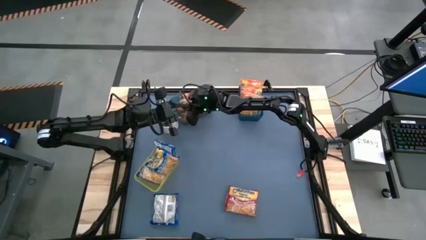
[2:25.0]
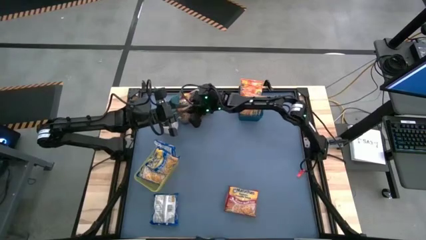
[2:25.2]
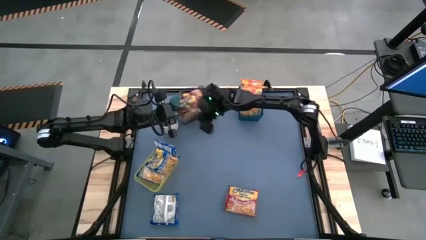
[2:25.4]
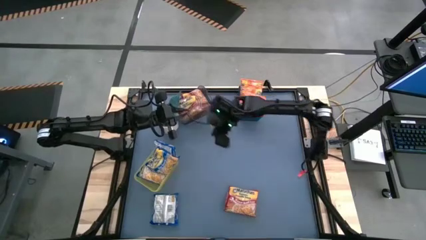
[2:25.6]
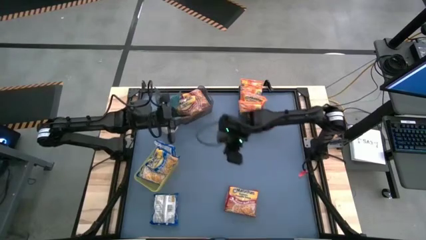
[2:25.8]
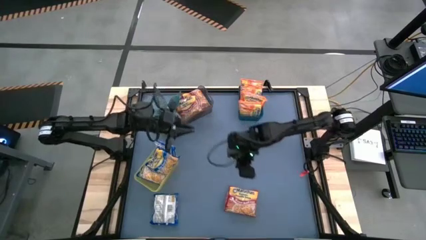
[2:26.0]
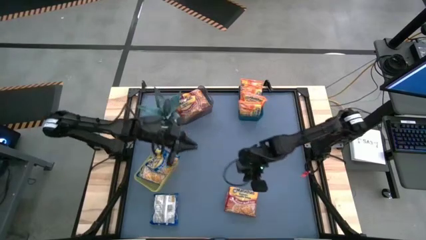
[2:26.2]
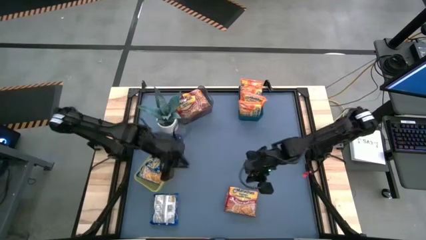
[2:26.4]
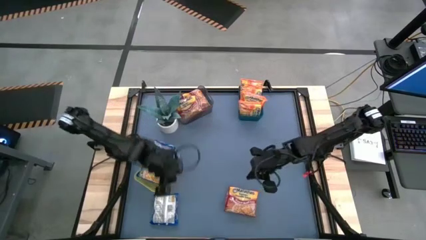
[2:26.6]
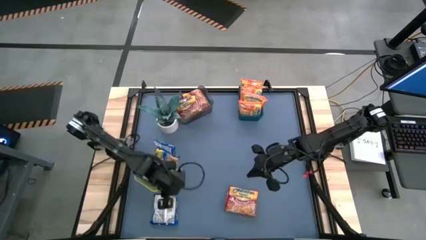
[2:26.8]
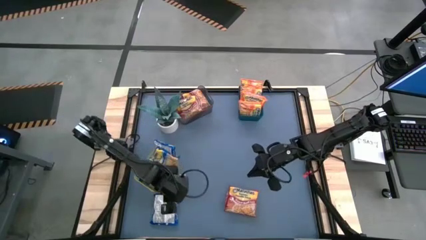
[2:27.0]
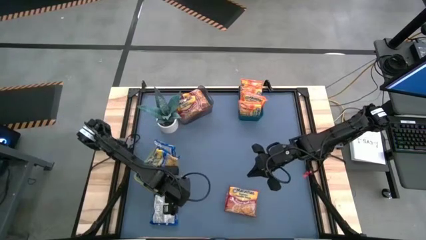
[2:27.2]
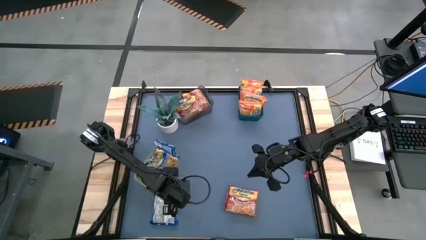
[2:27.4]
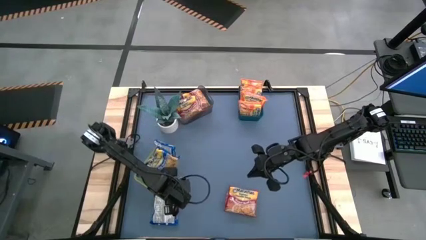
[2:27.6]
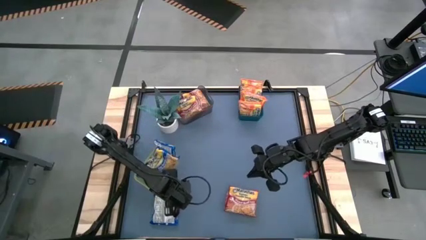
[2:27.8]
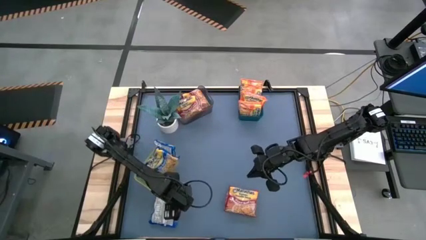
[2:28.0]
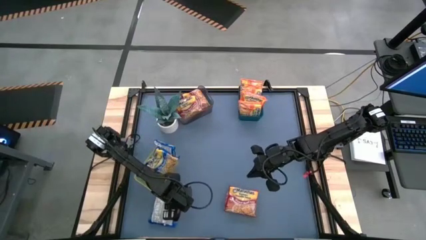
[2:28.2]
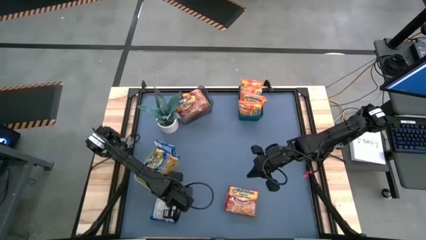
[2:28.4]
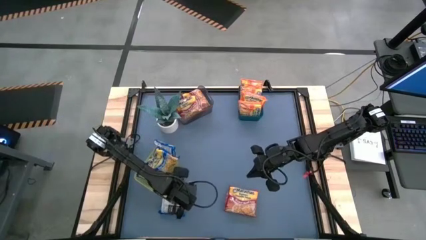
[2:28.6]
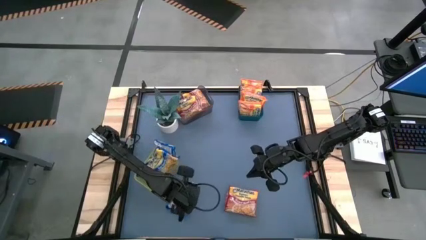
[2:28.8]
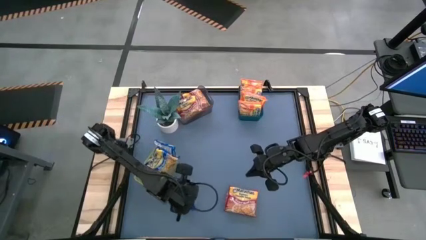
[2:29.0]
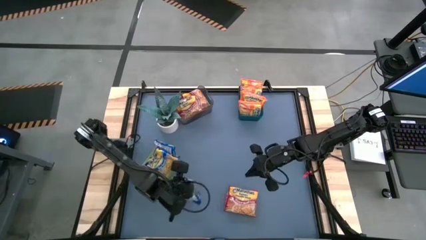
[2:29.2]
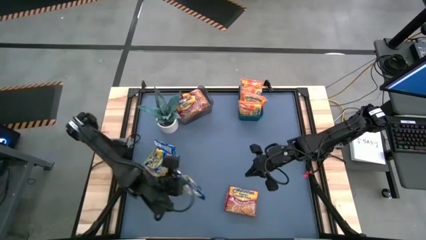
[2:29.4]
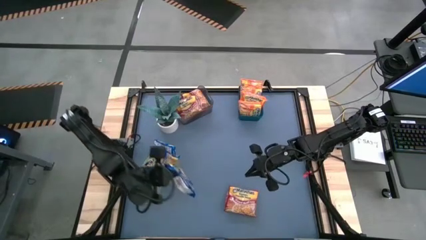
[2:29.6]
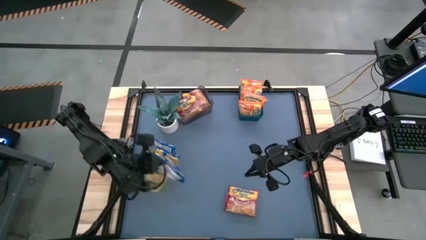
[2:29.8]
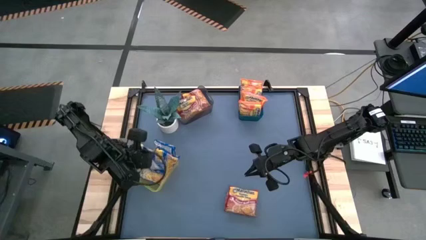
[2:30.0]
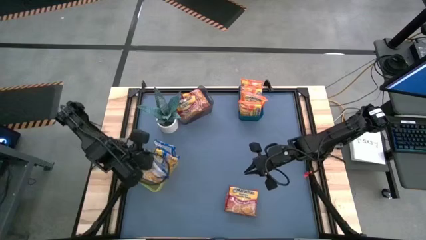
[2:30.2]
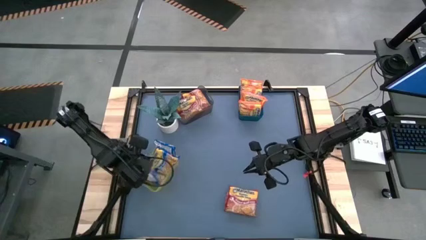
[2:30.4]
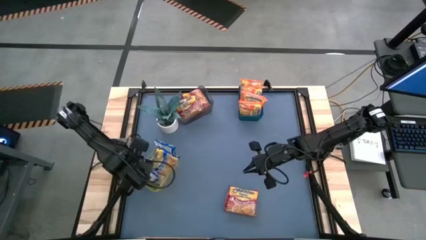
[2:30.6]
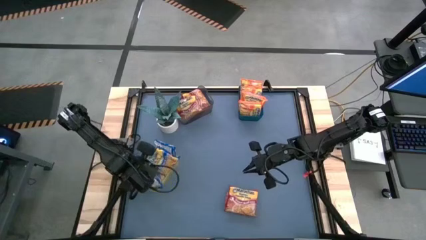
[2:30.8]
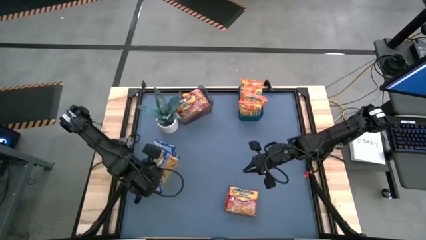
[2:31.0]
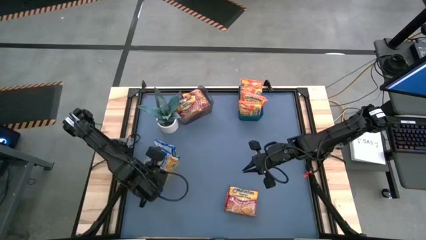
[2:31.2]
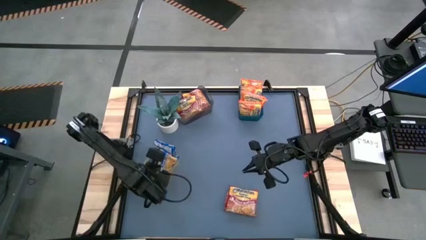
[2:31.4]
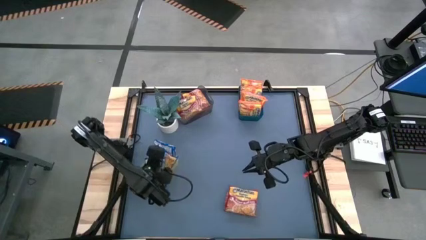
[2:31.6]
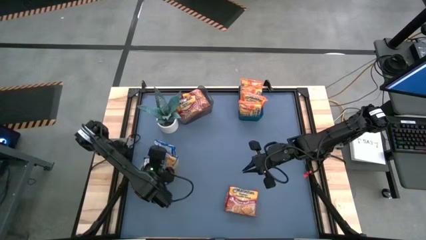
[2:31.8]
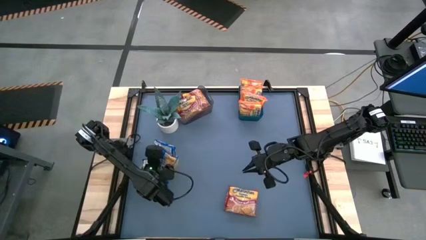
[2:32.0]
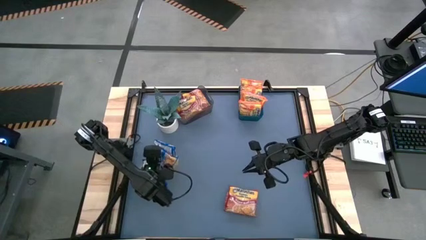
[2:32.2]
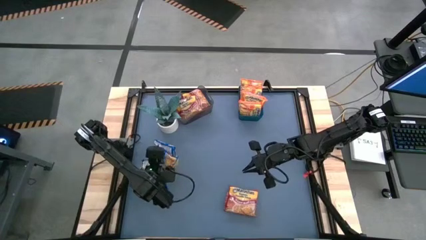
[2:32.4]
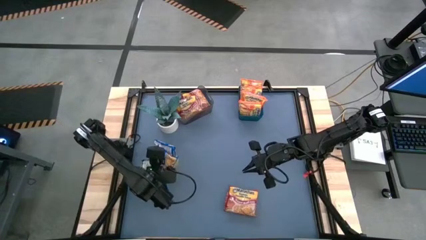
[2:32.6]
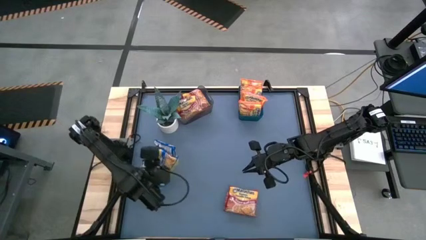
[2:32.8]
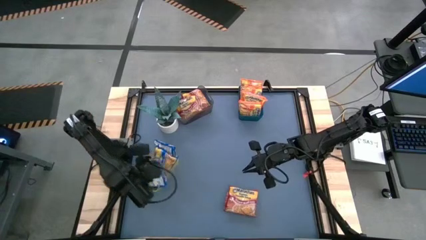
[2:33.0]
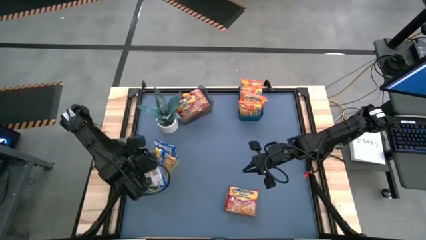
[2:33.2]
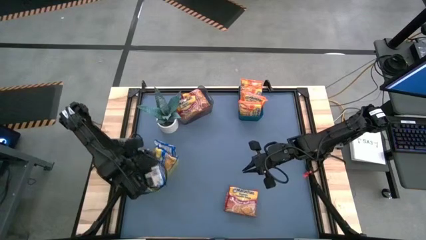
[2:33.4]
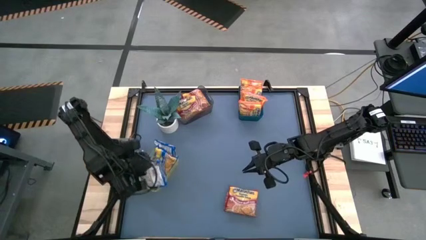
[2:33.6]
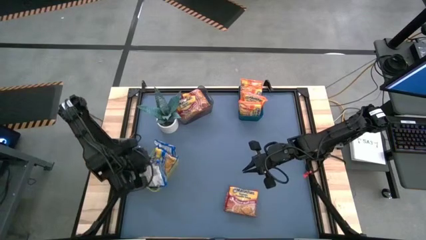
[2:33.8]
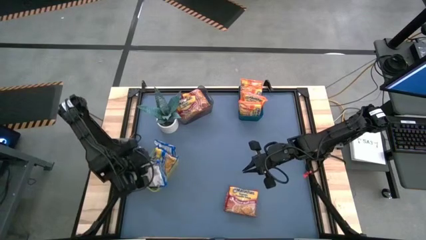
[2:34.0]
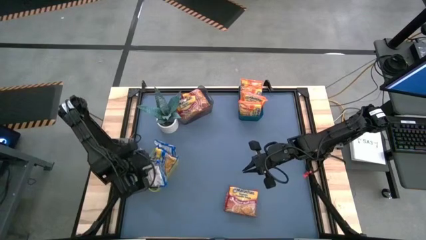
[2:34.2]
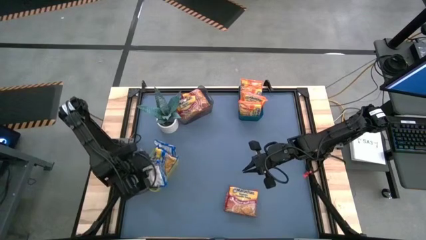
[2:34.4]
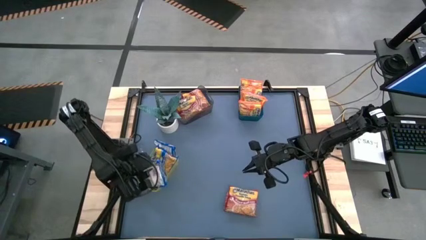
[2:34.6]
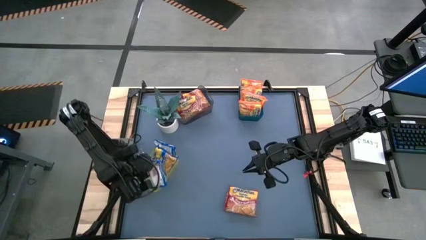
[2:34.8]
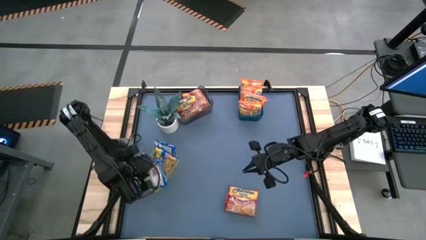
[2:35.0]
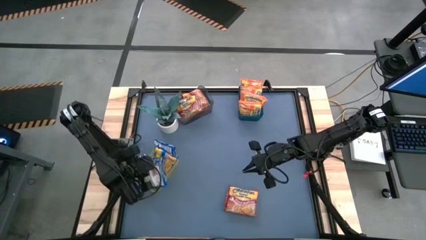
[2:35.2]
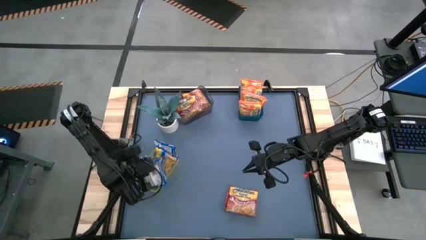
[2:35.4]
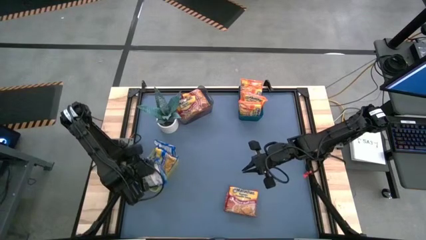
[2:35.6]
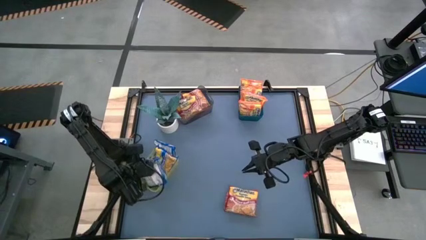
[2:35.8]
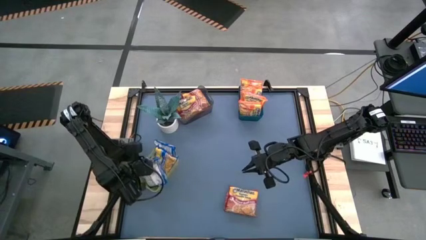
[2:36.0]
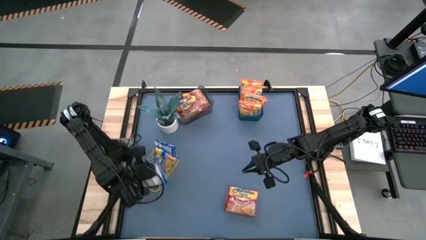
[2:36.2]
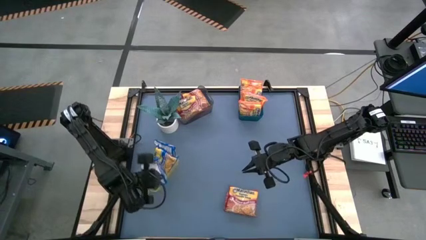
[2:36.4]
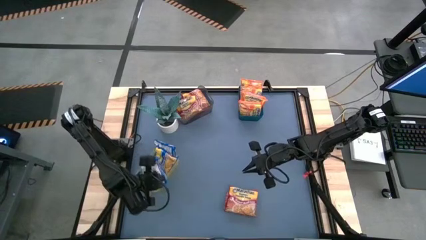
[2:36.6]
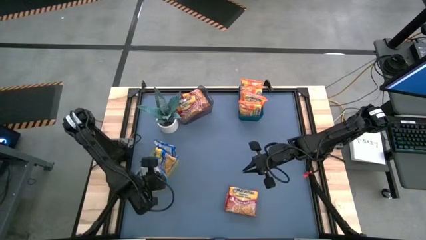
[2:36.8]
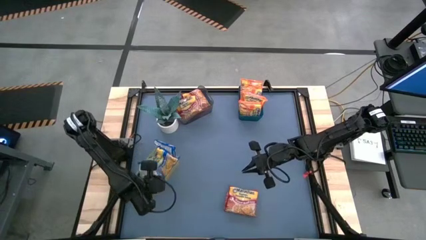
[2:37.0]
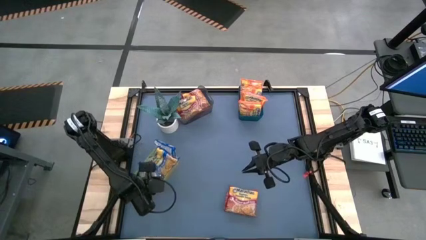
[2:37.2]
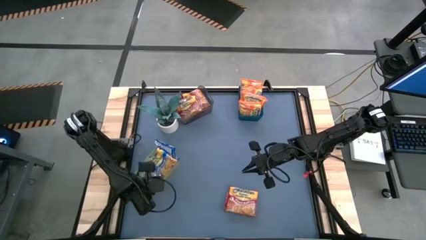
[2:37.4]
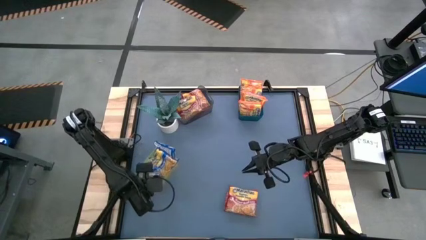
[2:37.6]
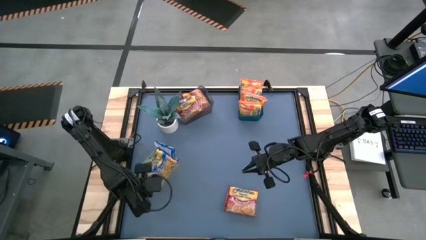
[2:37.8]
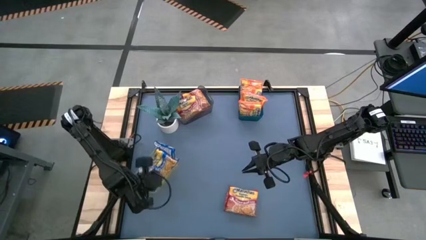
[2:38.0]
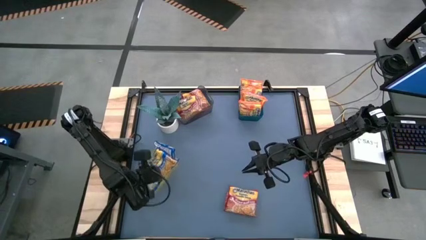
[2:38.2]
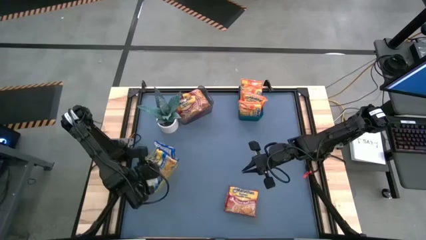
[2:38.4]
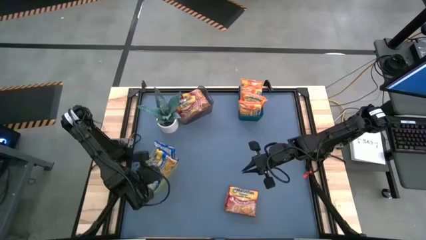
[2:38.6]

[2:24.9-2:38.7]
Task: Sort Maruchan noodles
Put the blue noodle pack into the yellow bin

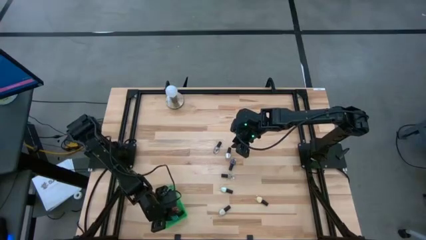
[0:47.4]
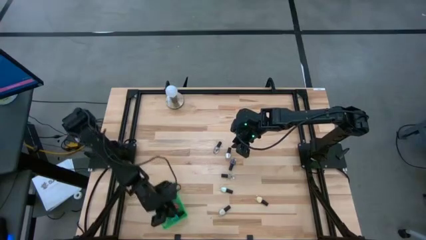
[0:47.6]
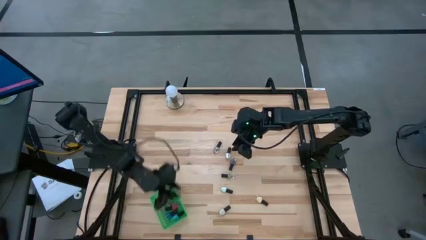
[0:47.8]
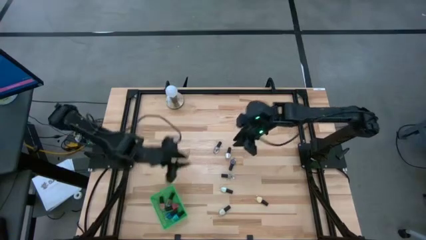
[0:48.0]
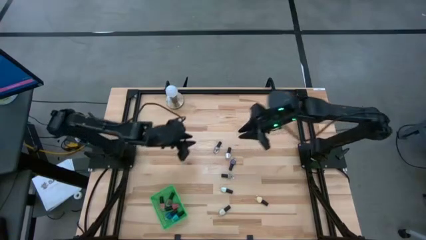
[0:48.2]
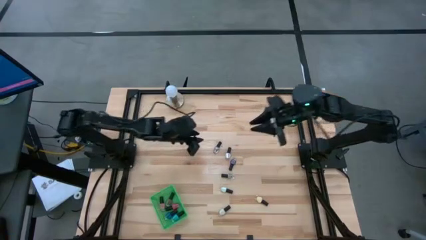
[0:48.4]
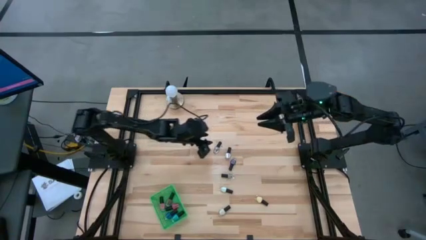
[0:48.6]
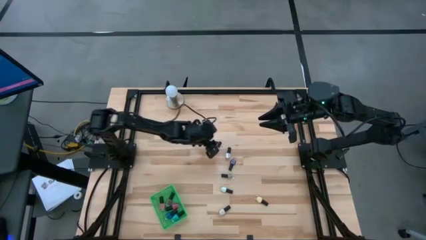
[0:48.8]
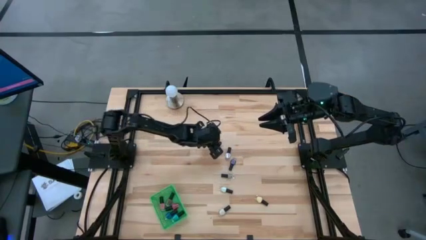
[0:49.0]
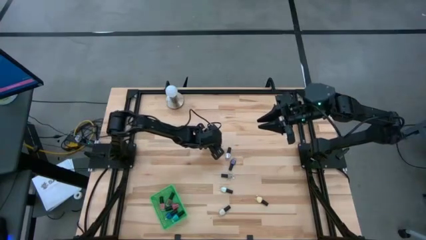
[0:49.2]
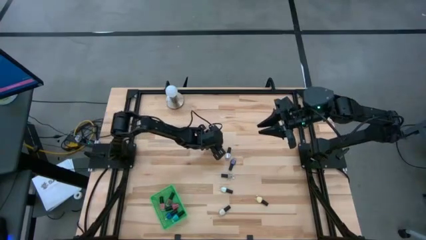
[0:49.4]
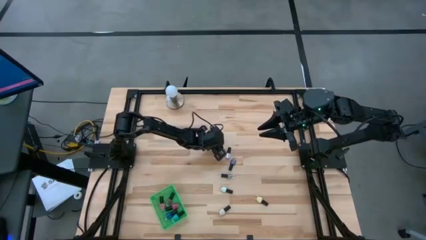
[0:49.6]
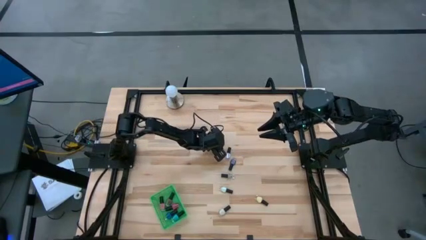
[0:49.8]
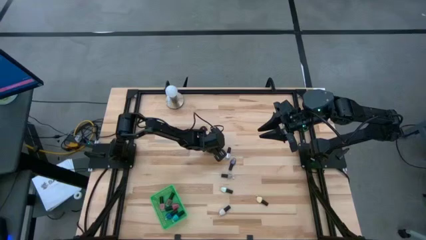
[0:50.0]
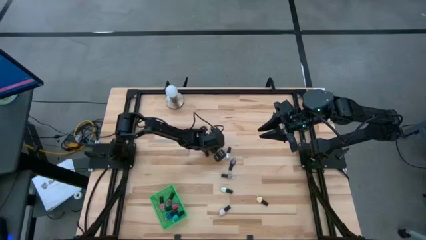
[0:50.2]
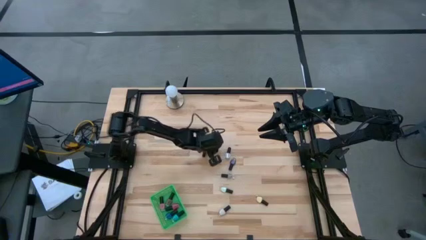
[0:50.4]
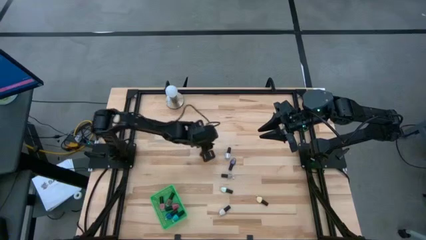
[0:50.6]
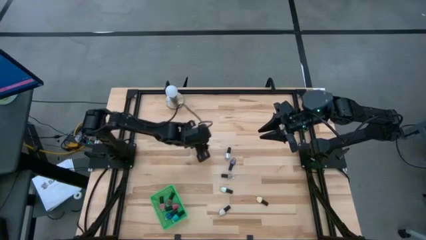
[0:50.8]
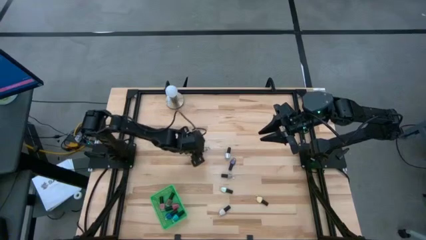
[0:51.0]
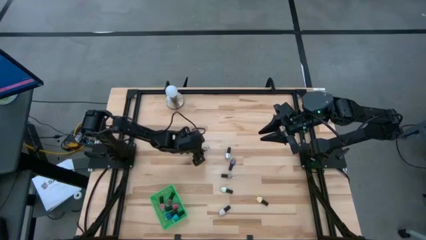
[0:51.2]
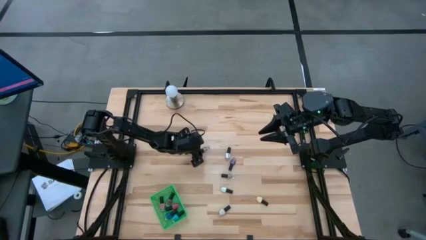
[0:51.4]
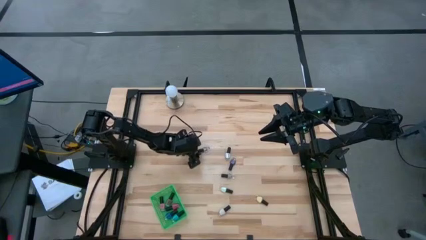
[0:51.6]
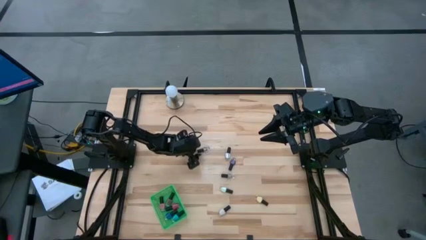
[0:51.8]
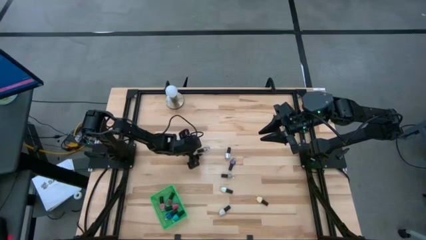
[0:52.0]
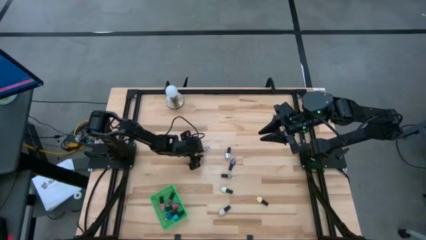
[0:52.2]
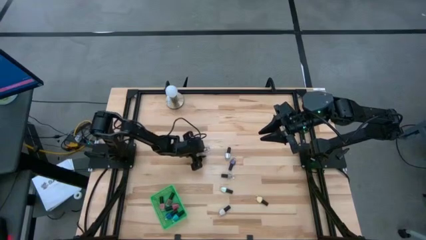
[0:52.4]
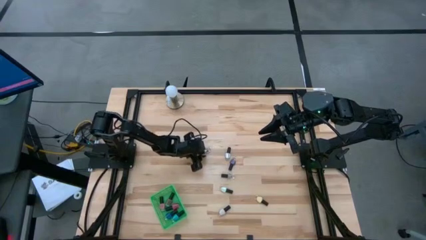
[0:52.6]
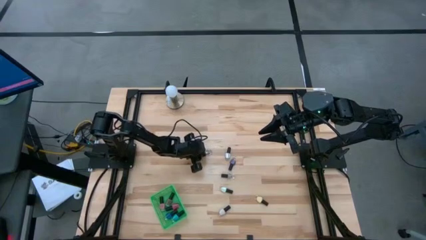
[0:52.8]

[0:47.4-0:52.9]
Task: Pick & Place Nail Polish
Put the transparent nail polish bottle into the green basket
